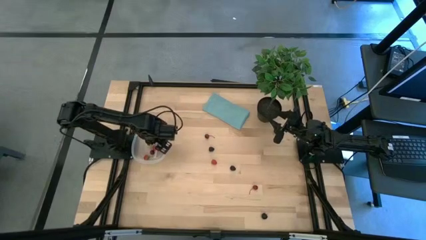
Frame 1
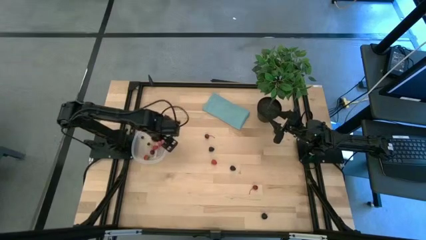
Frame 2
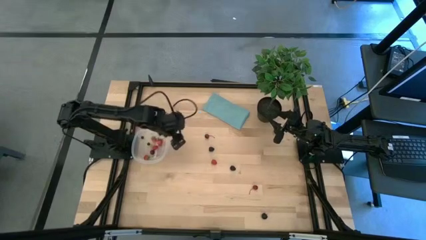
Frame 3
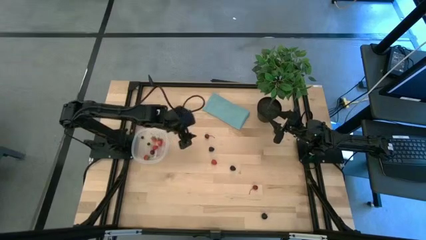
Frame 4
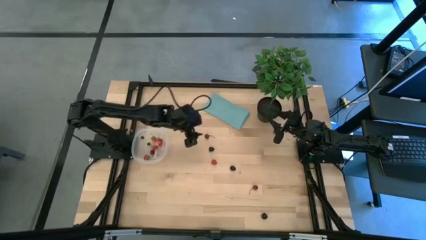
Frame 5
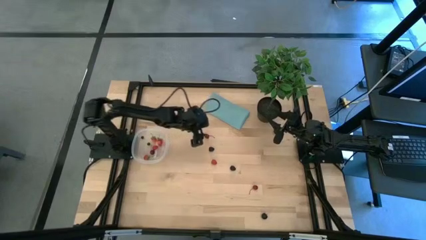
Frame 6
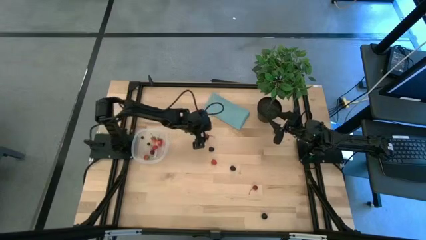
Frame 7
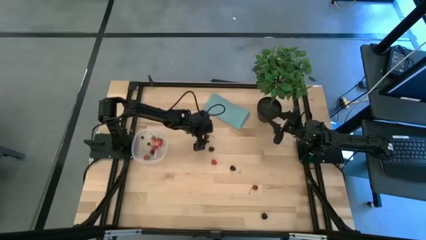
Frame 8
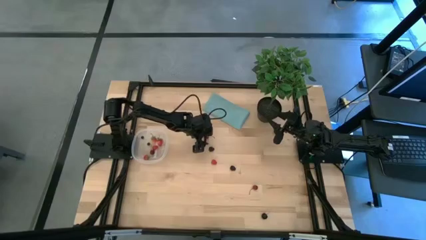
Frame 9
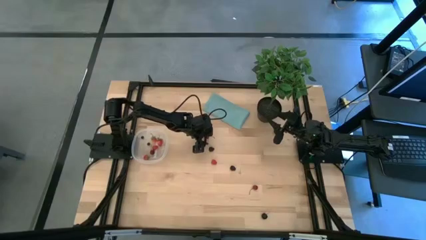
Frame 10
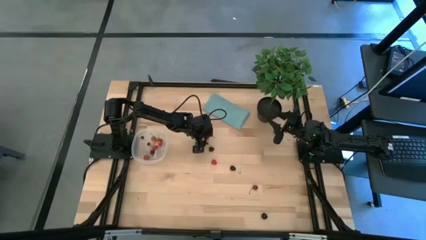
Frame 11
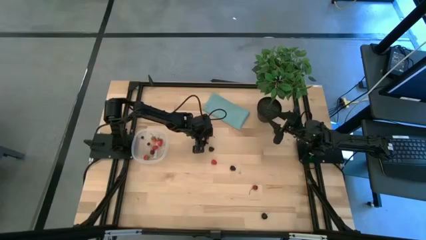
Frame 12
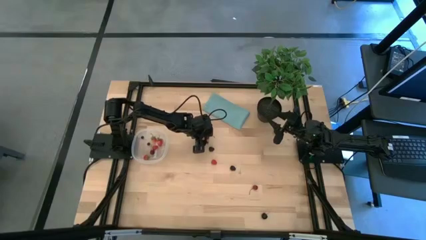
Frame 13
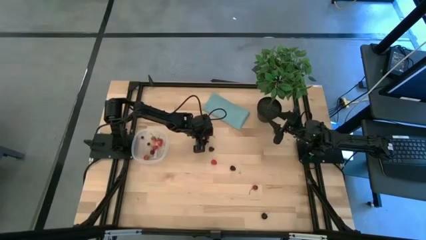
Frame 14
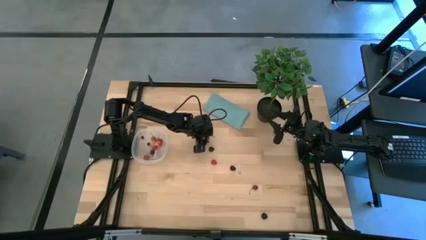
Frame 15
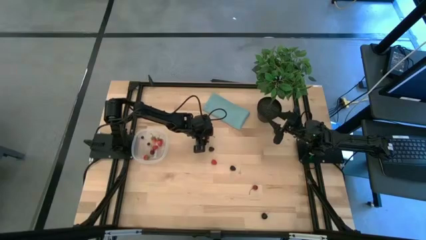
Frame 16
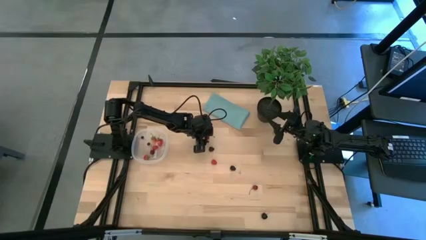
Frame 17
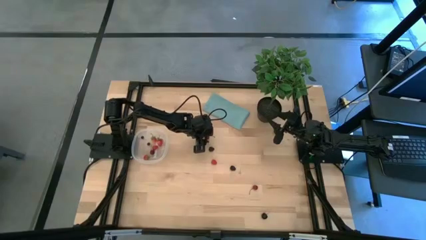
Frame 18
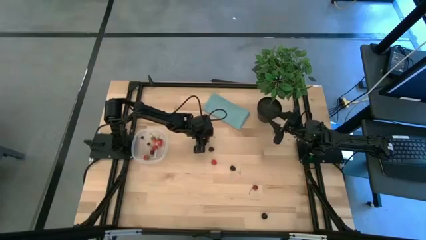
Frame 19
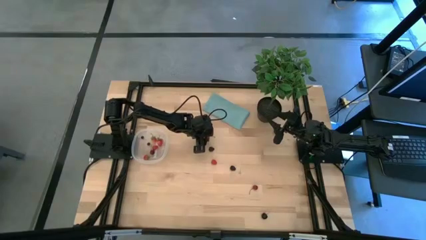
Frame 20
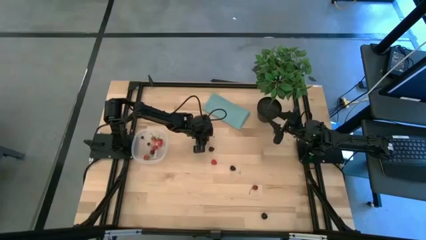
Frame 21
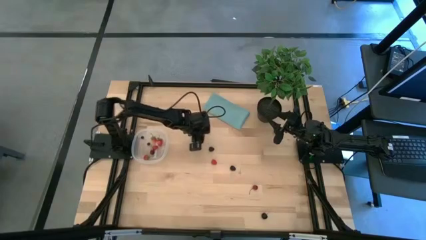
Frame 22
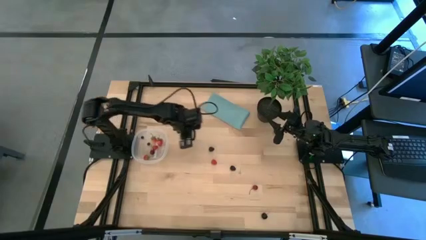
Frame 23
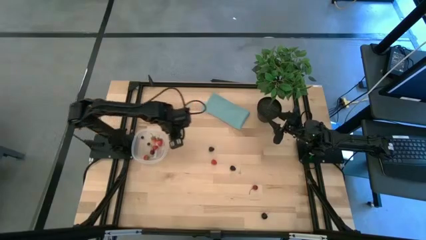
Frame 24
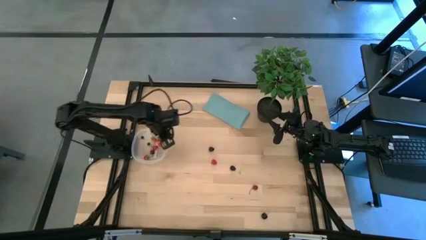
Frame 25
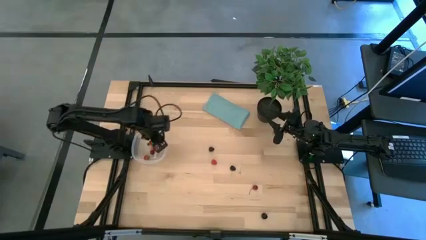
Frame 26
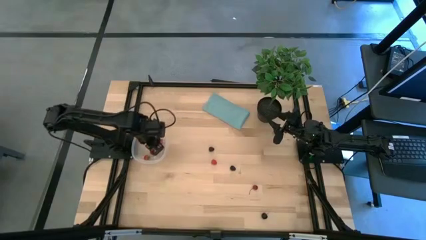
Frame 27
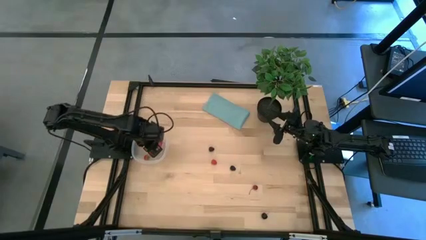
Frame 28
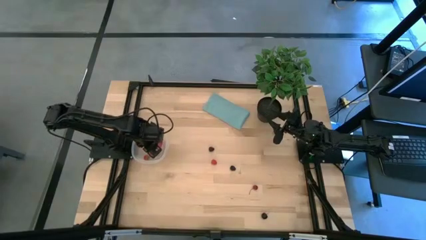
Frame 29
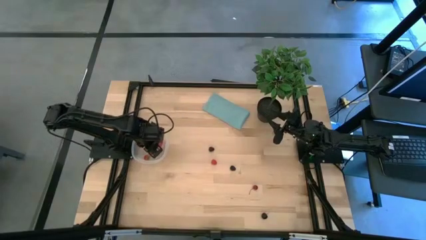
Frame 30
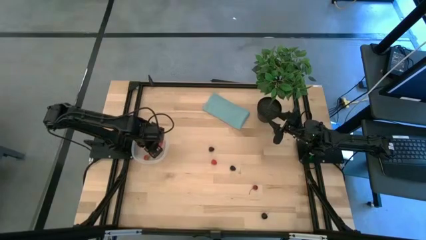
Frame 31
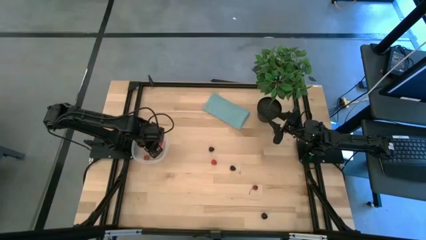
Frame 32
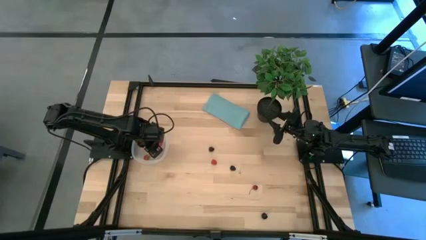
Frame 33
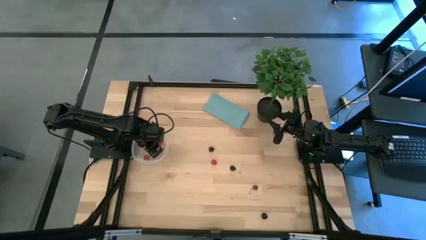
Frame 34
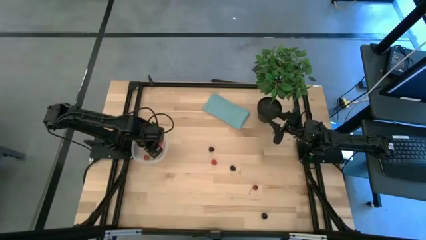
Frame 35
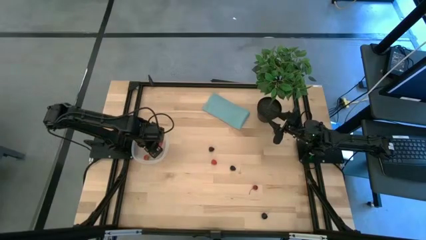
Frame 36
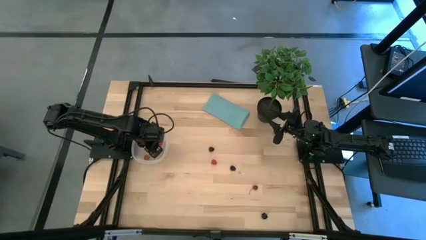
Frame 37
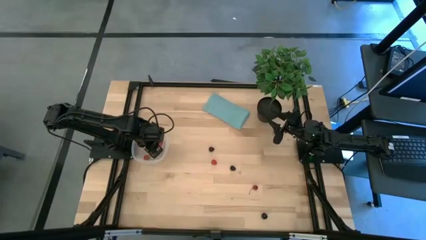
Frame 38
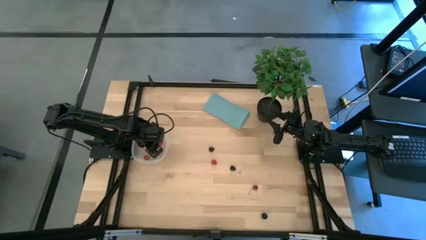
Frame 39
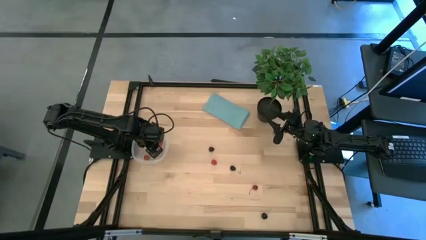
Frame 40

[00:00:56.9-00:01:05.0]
Task: Pick and placing Produce into tupperware
Put the top red cherry into the transparent bin

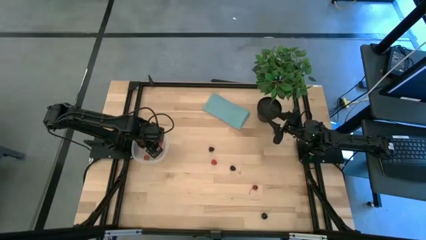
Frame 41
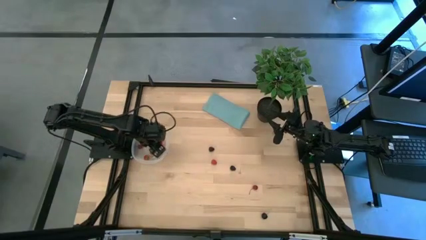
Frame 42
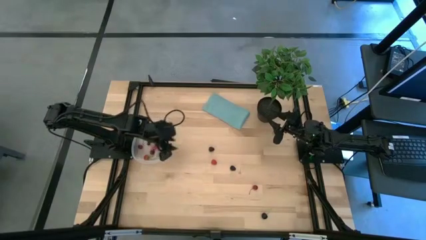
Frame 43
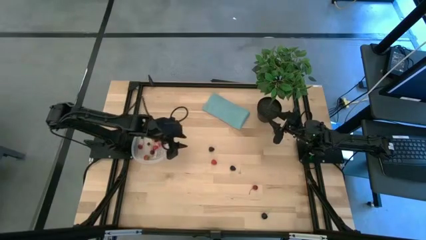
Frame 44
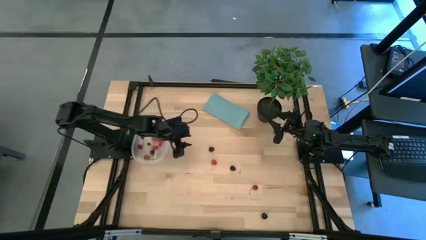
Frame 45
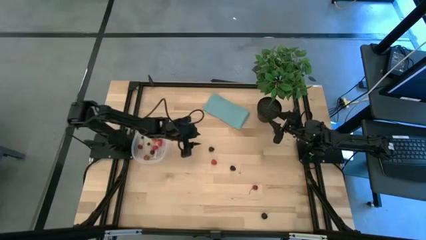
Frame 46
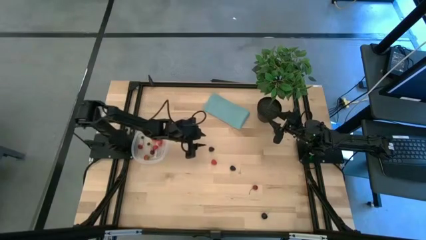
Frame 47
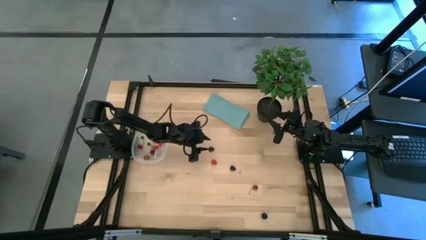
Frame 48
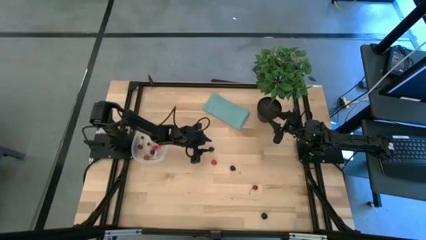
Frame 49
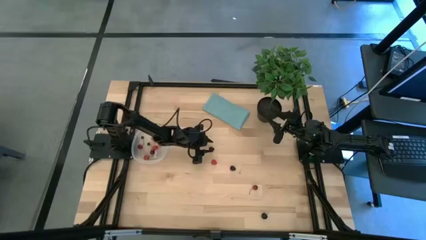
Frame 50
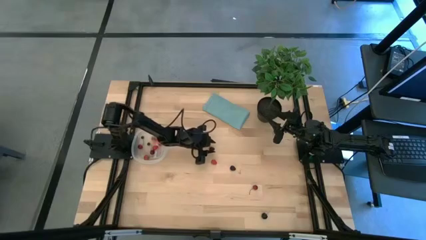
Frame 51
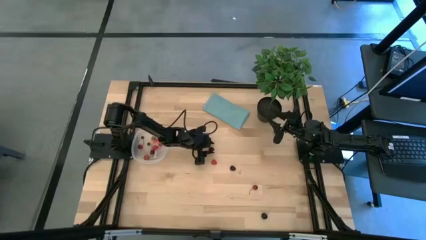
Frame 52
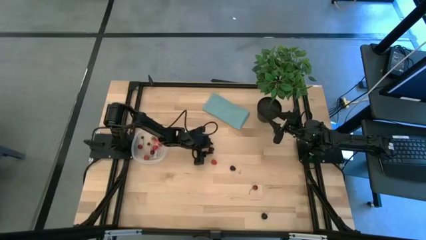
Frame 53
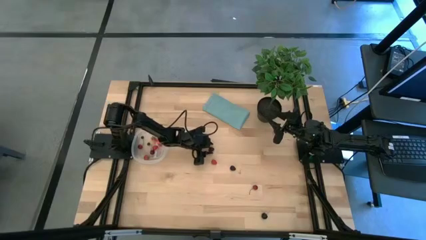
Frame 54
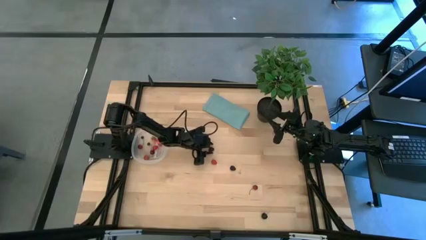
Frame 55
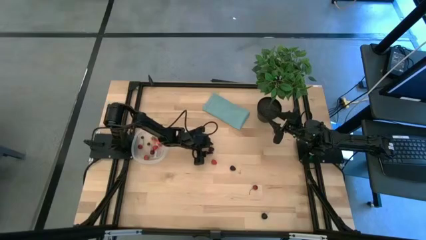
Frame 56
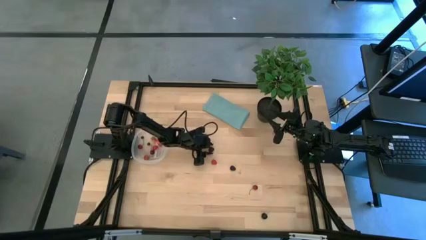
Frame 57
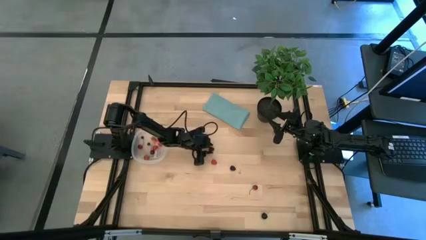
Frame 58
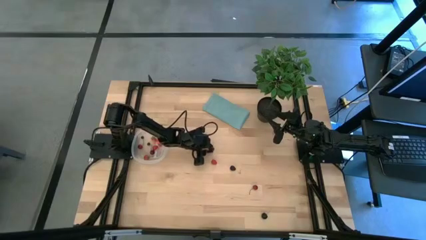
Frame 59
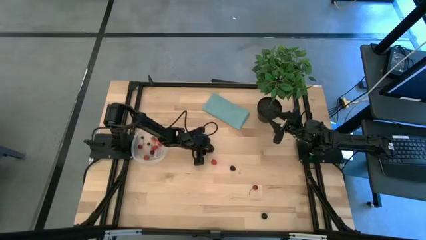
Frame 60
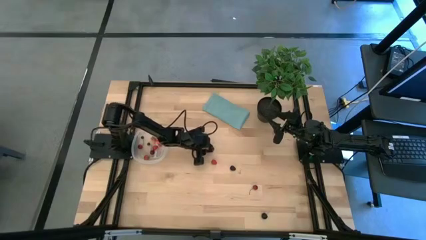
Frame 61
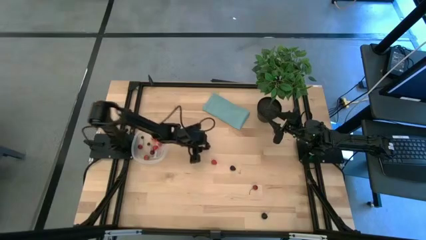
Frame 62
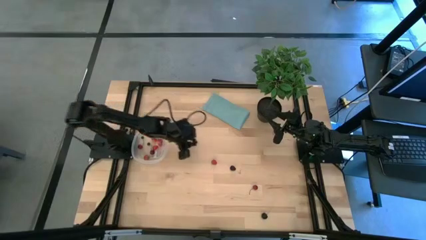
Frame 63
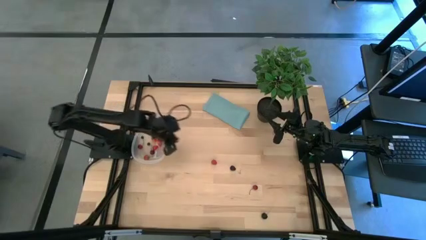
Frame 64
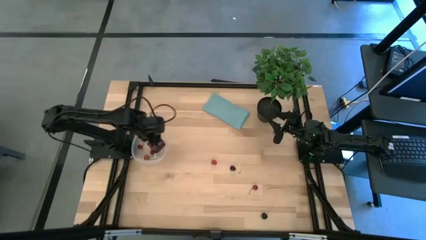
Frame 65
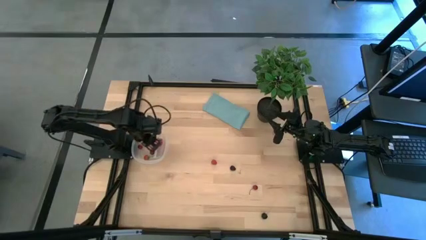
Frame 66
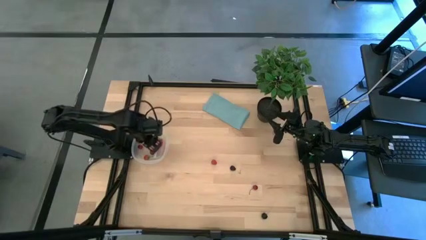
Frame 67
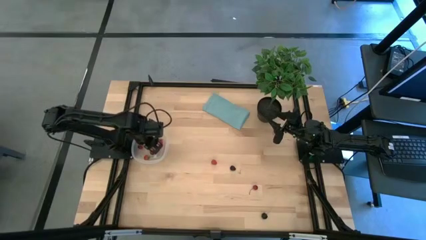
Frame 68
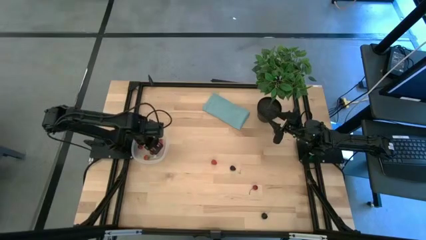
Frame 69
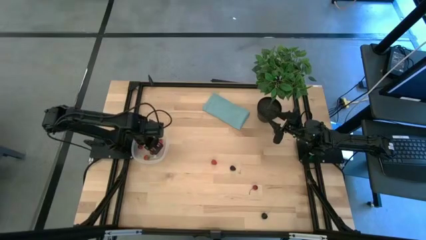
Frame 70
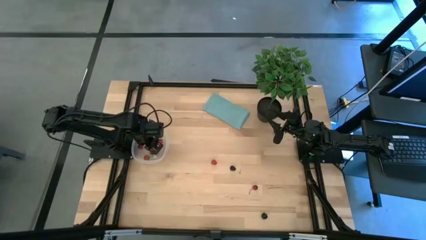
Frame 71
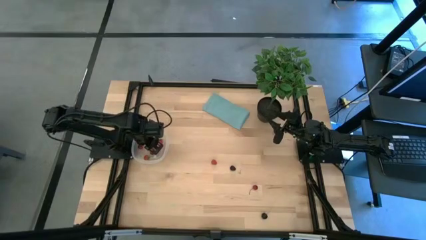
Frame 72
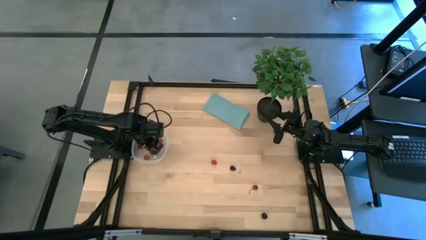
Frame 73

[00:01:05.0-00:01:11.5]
Put the top blackberry into the transparent bin

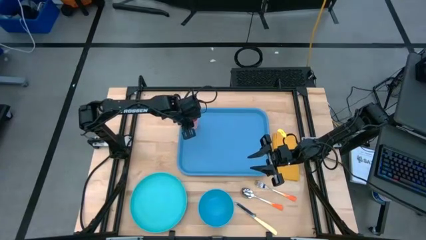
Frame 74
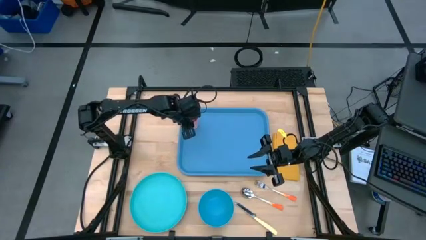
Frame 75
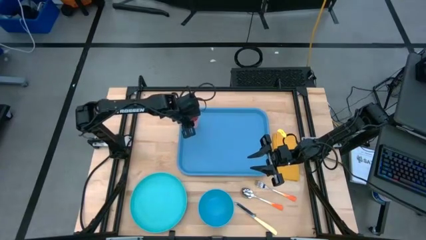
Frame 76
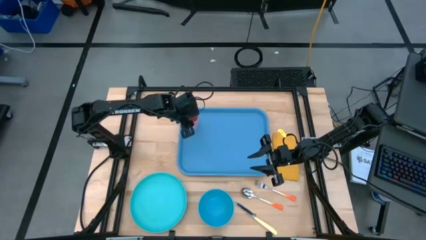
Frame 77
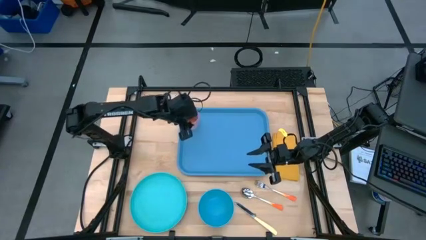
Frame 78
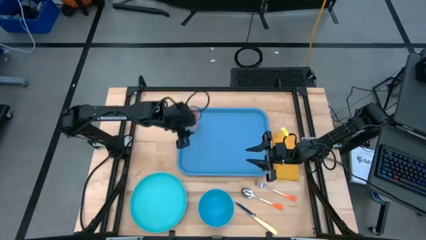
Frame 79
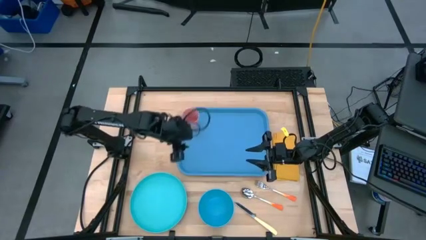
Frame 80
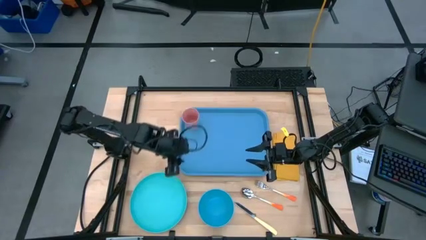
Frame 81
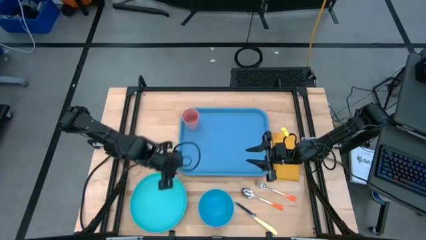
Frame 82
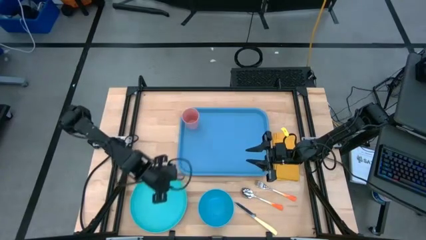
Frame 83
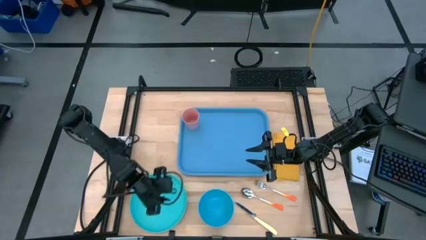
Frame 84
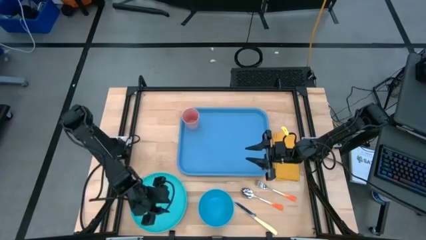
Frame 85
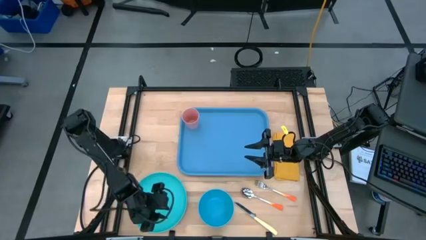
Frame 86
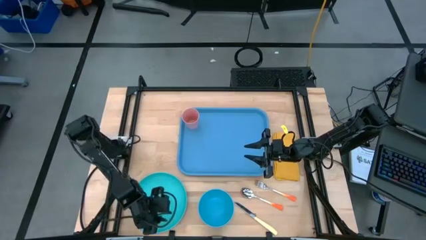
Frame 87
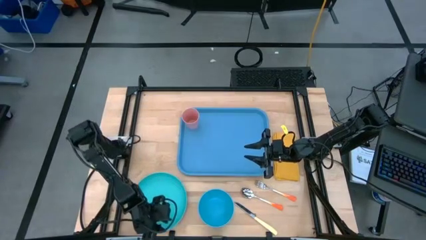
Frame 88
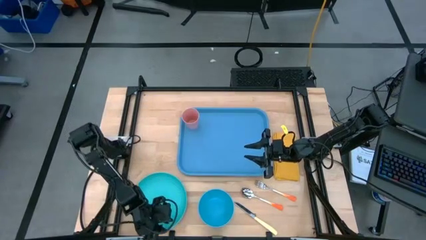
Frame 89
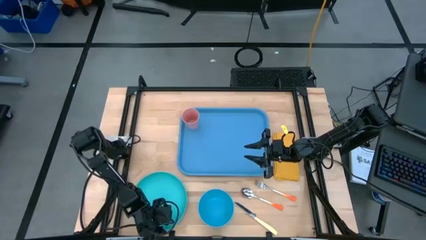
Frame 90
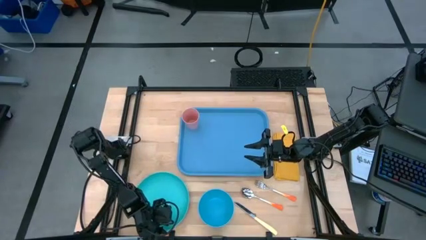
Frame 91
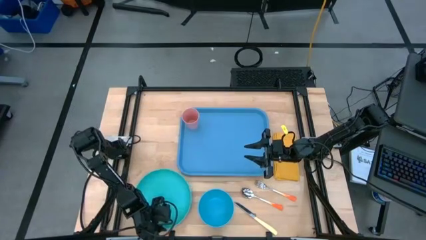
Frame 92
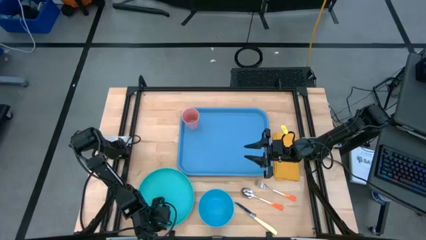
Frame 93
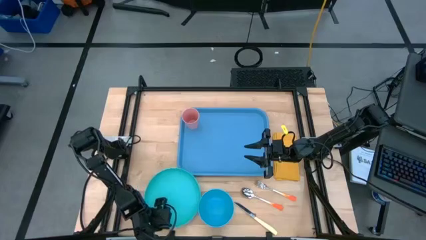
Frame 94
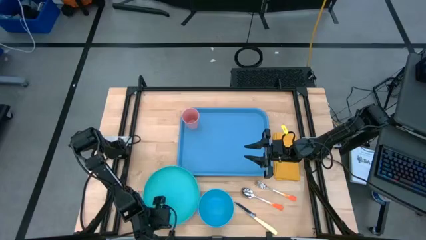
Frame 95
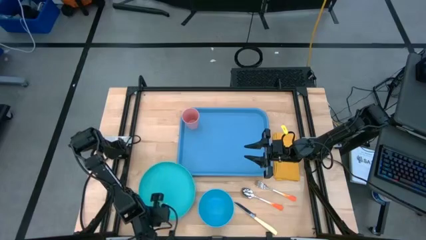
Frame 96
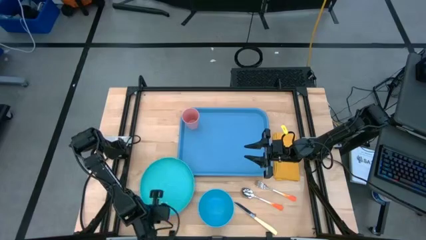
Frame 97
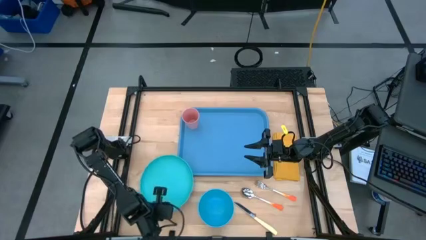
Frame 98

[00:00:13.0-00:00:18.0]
Task: Set up tray
Put the blue plate on the blue serving tray to the bottom right of the pink cup
